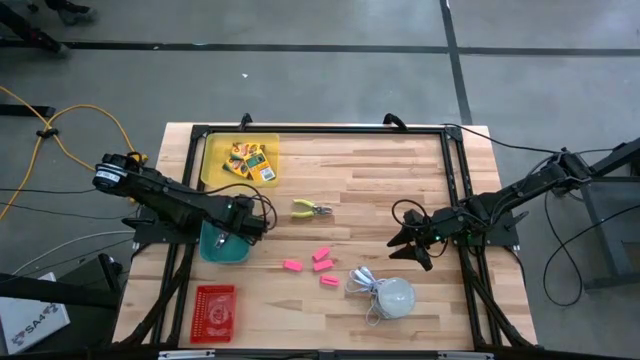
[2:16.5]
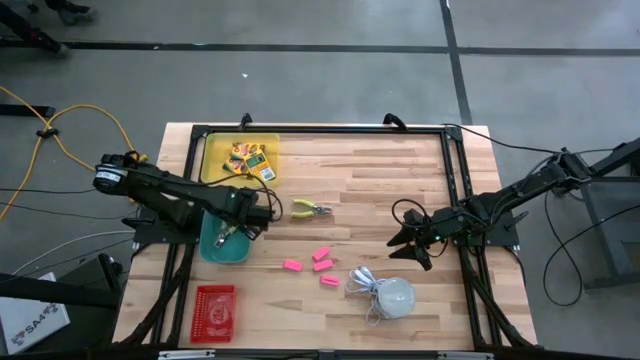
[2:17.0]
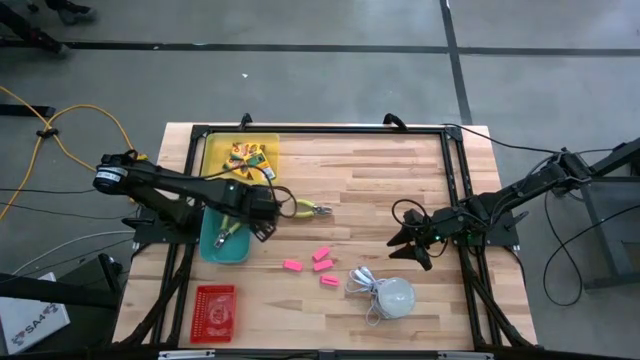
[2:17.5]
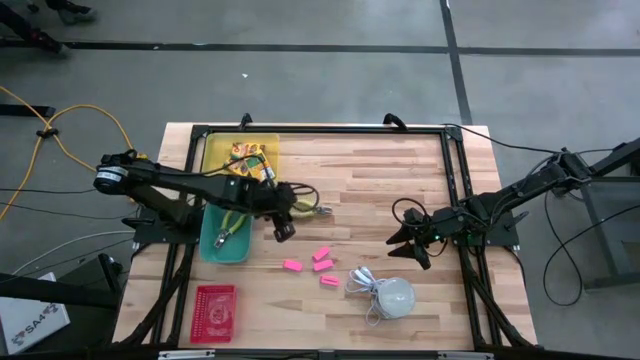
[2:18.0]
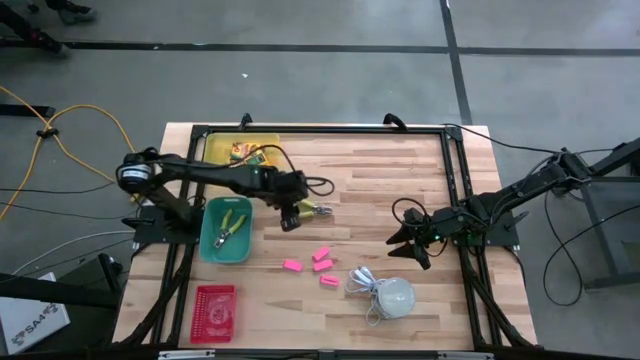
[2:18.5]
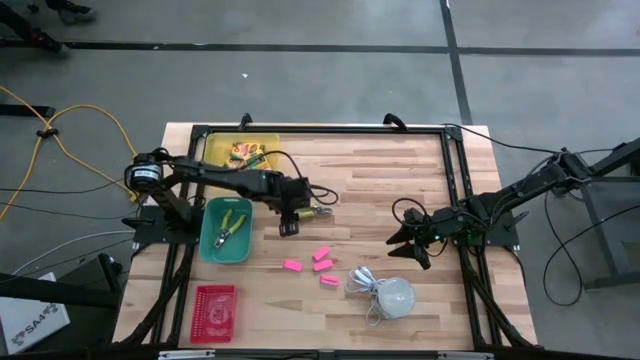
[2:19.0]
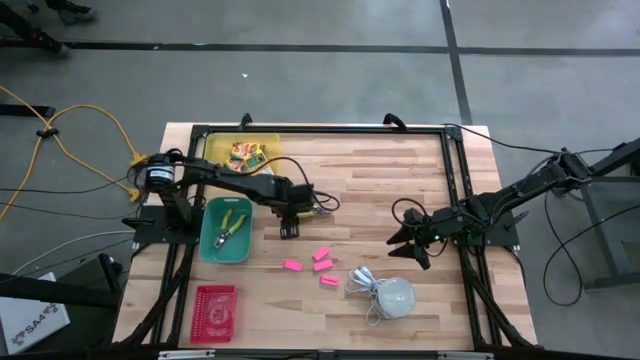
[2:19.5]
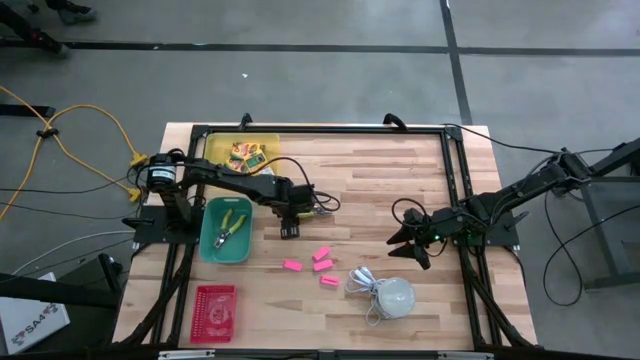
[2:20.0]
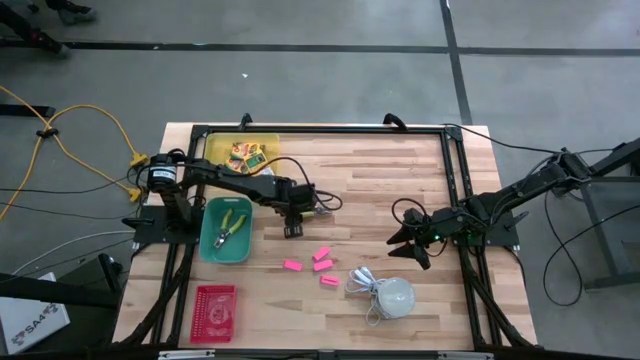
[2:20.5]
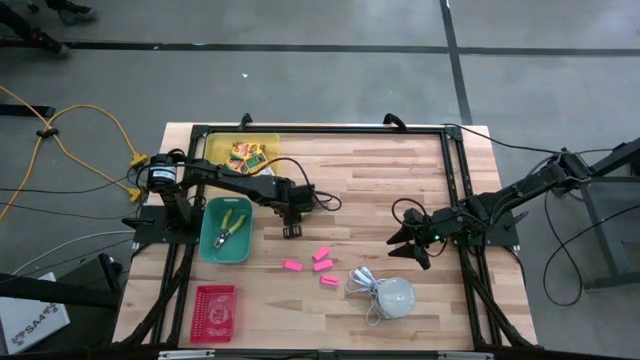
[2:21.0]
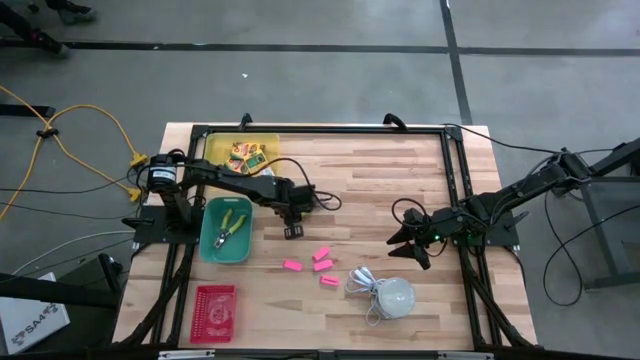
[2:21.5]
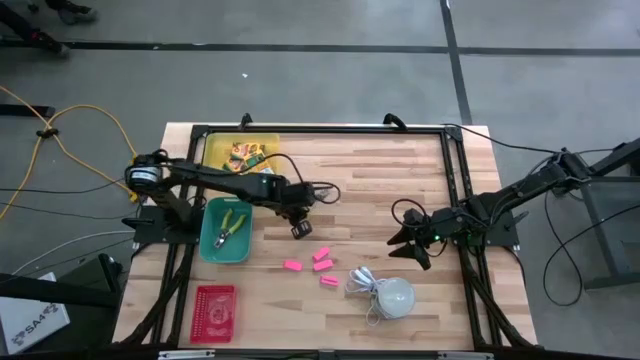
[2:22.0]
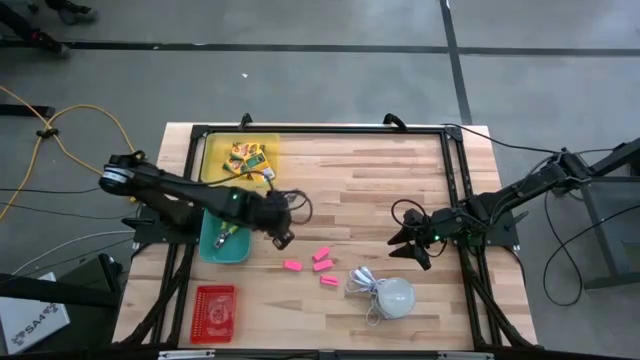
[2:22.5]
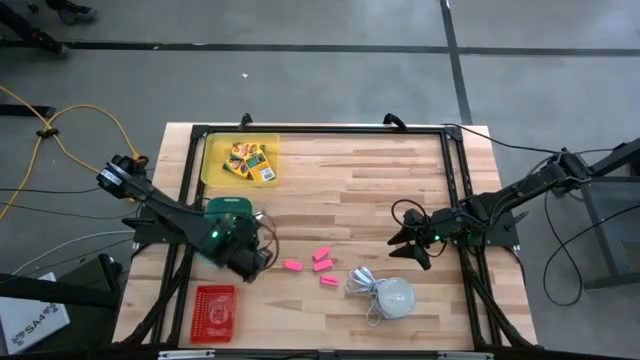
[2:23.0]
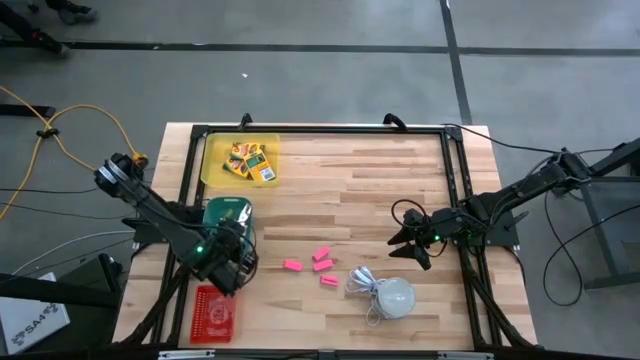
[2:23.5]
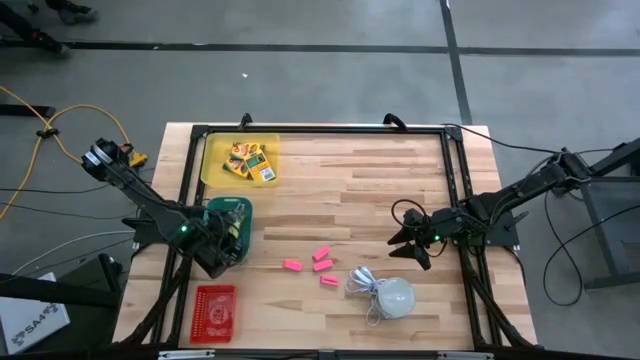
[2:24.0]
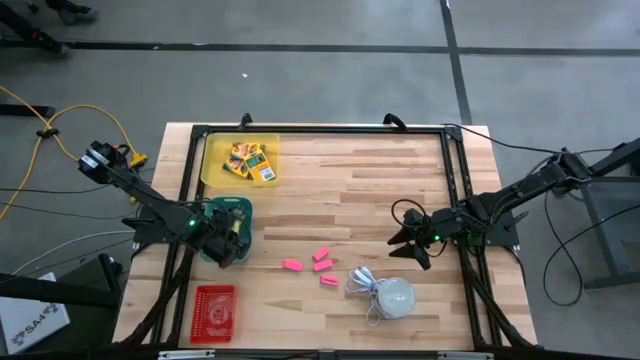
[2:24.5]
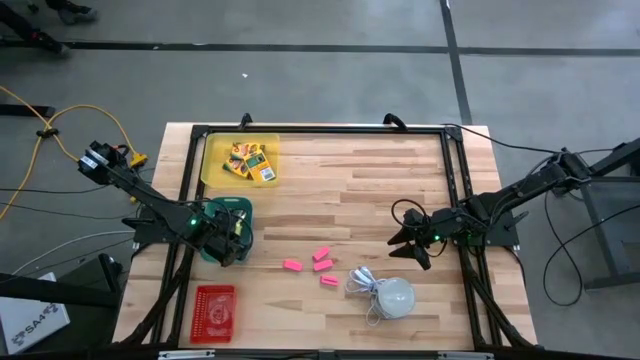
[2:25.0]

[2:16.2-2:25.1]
Task: Pick & Place School Supplies
Put the green puncher into the green bin

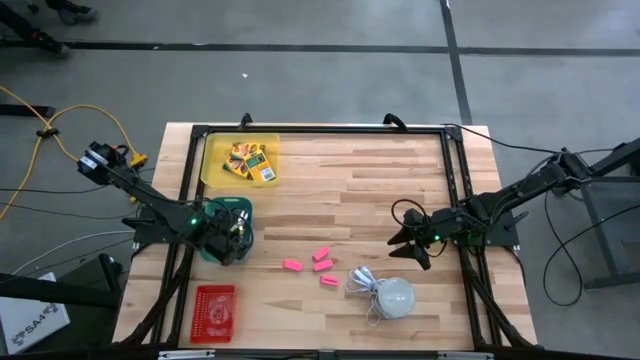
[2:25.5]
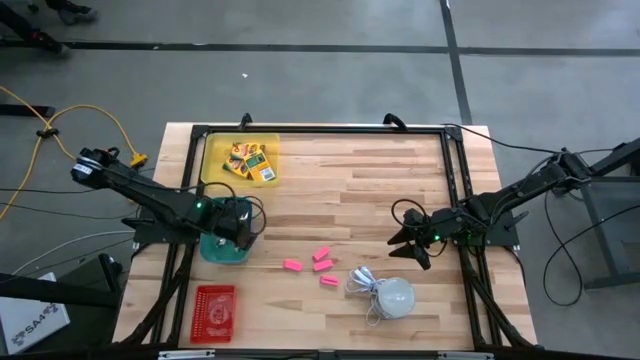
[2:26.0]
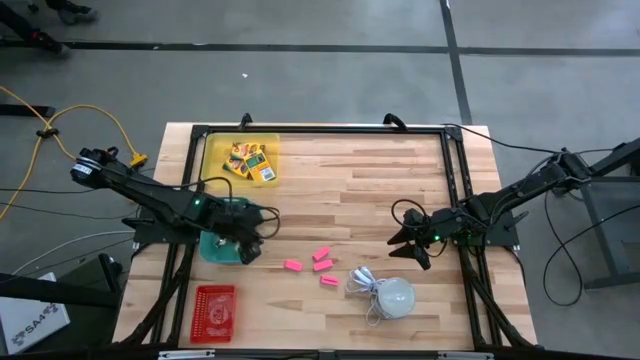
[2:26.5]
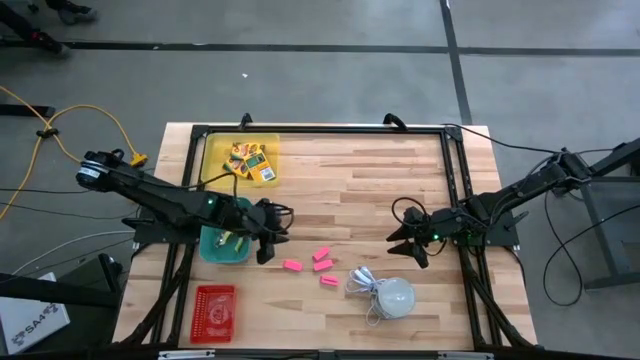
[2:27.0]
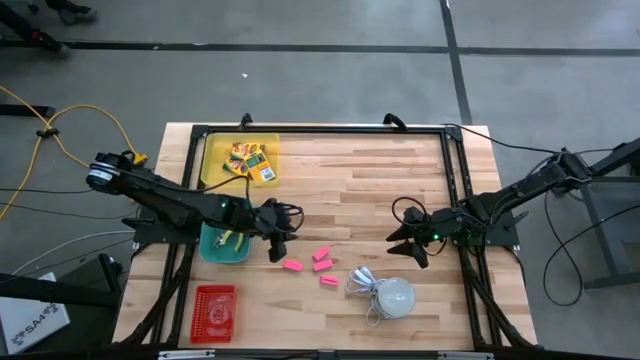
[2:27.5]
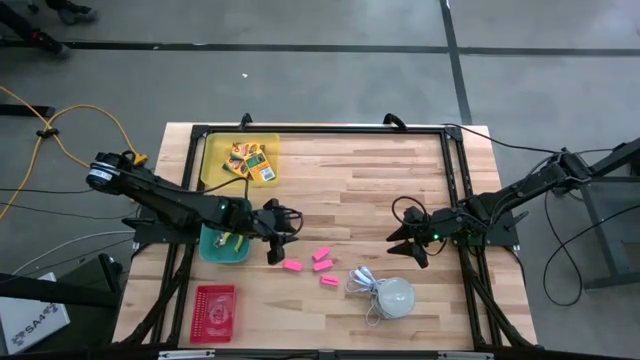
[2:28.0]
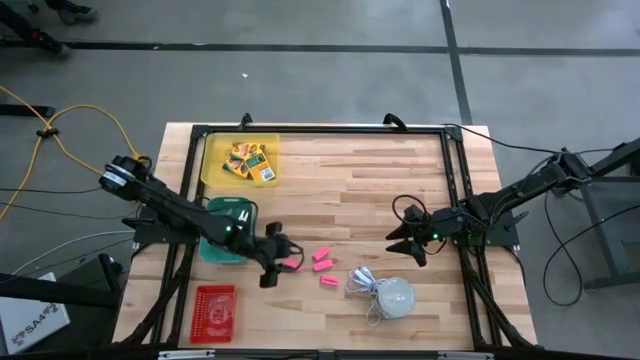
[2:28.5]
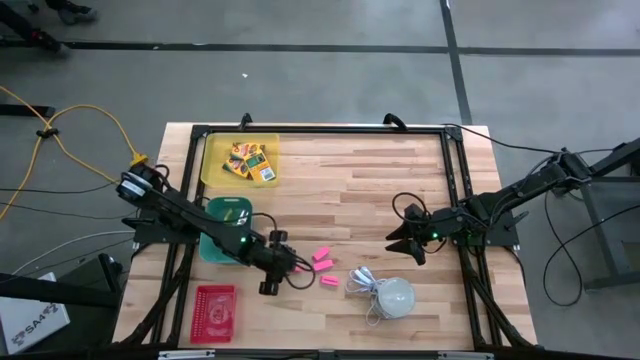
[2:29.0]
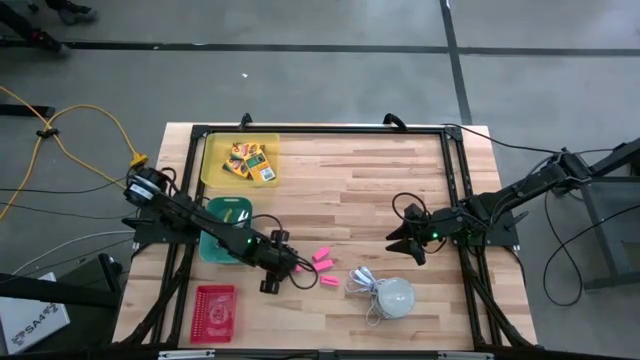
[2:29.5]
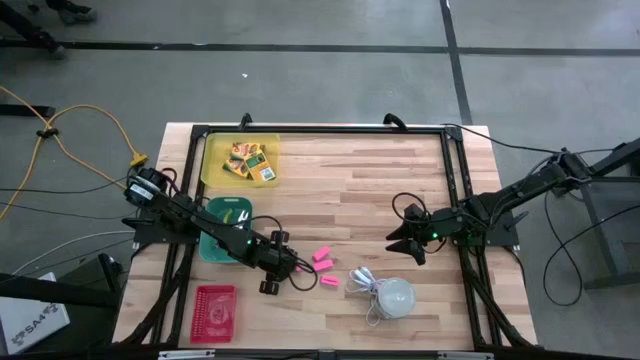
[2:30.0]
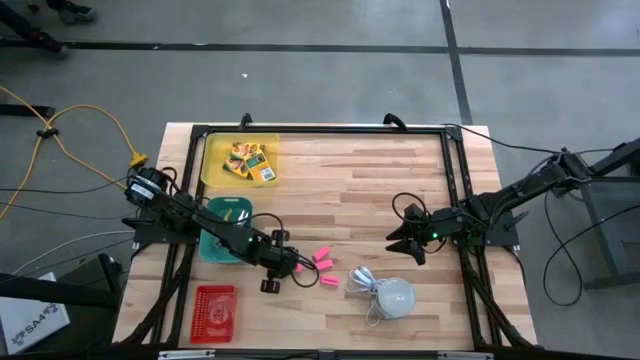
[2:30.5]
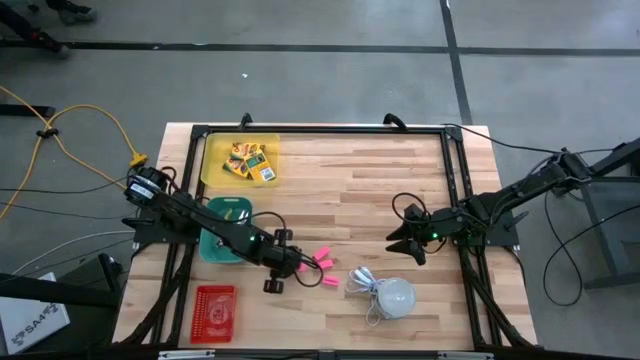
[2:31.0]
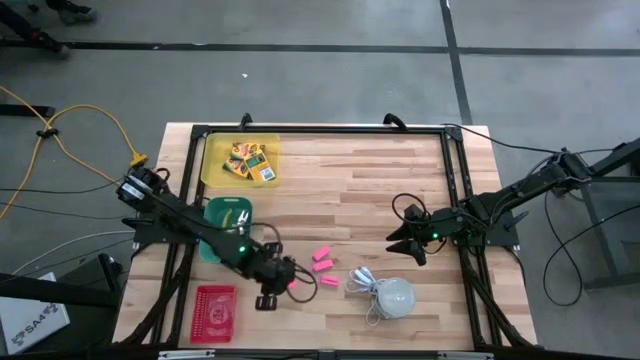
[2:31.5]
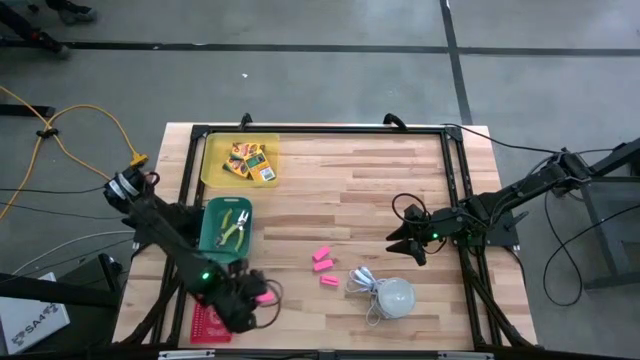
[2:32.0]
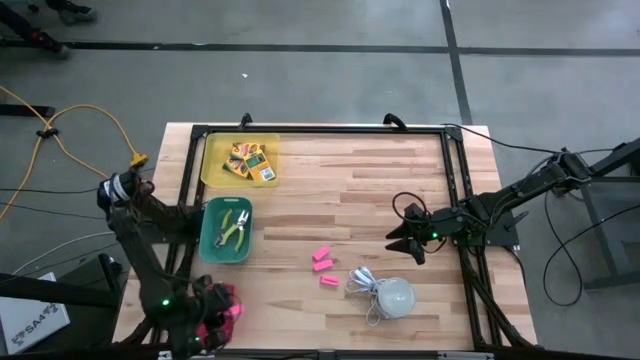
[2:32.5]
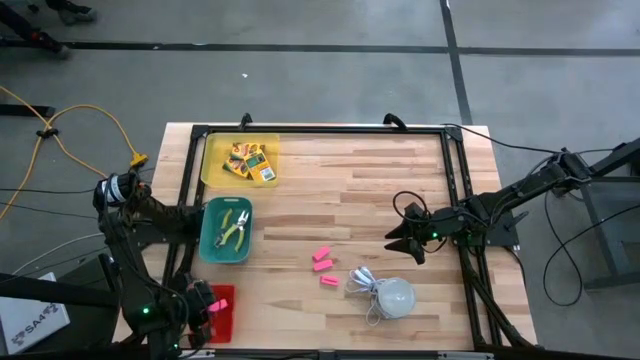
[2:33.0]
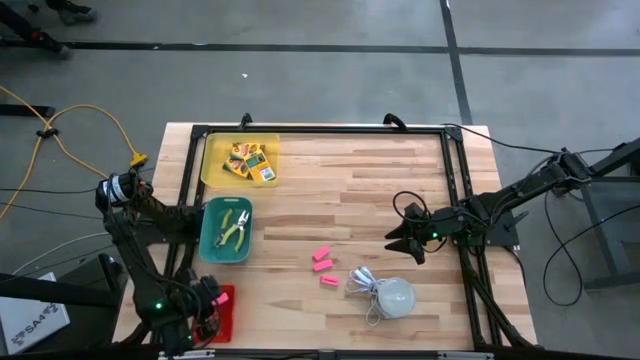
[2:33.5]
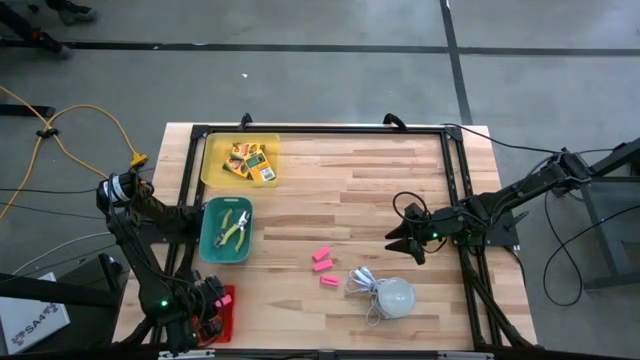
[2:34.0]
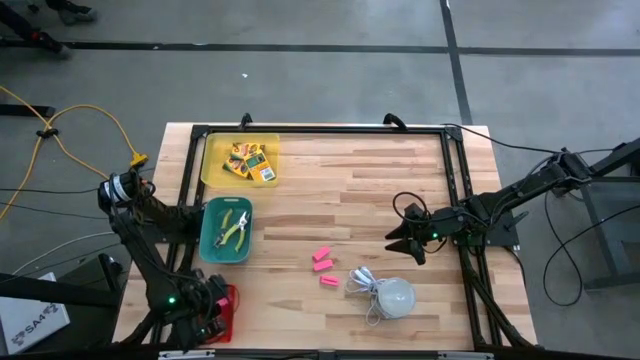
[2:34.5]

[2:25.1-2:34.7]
Put the middle left pink eraser into the red basket

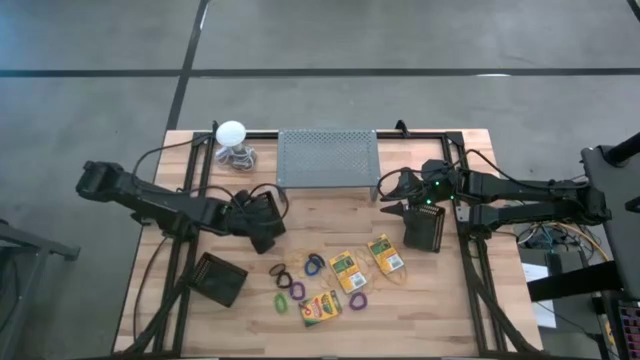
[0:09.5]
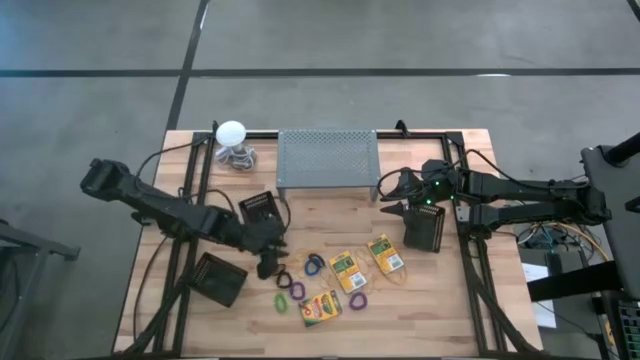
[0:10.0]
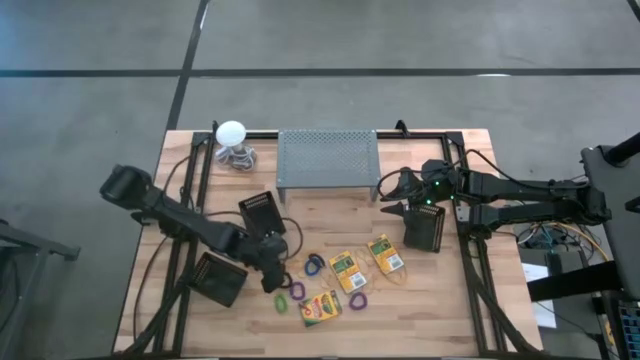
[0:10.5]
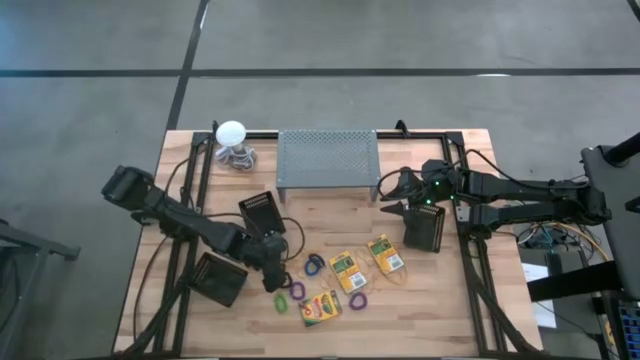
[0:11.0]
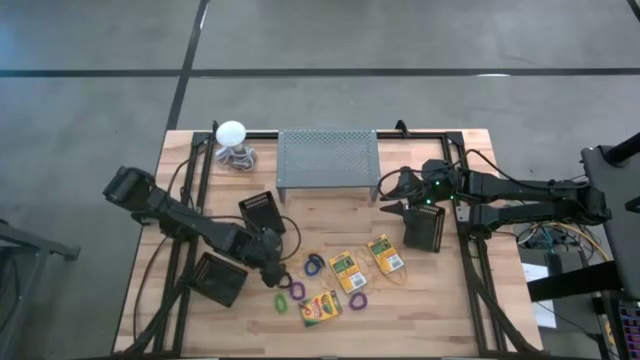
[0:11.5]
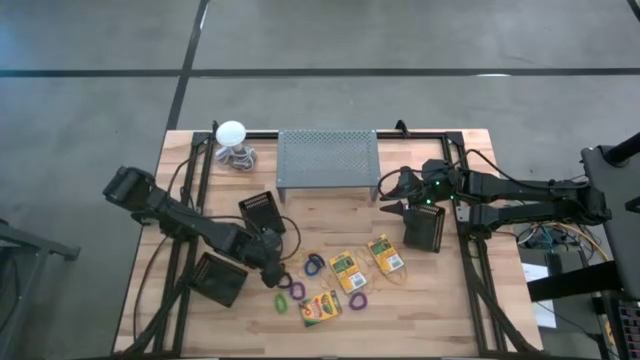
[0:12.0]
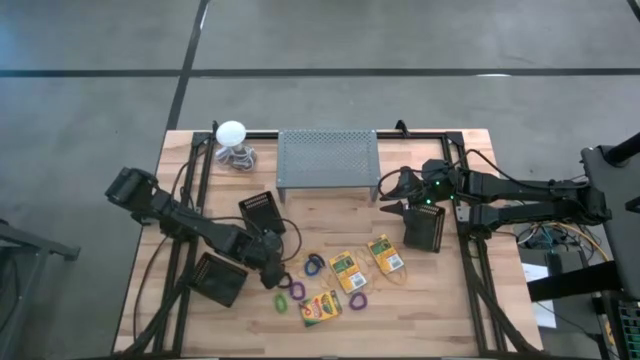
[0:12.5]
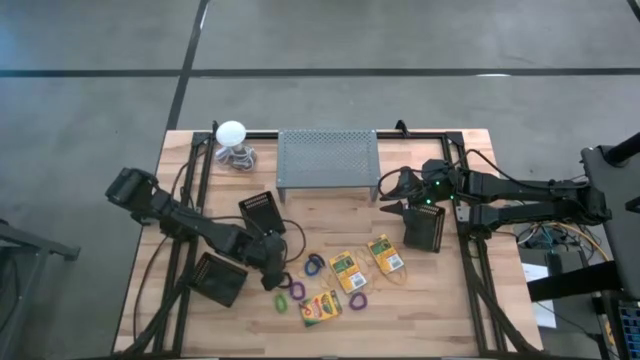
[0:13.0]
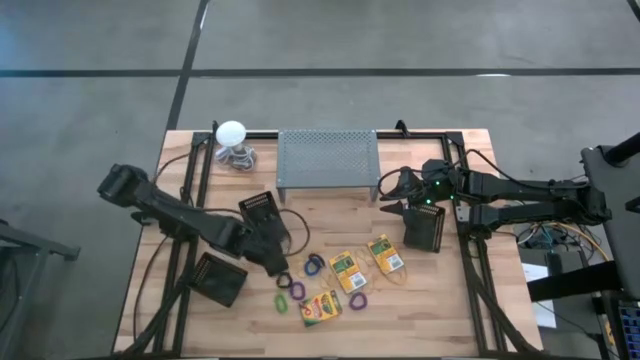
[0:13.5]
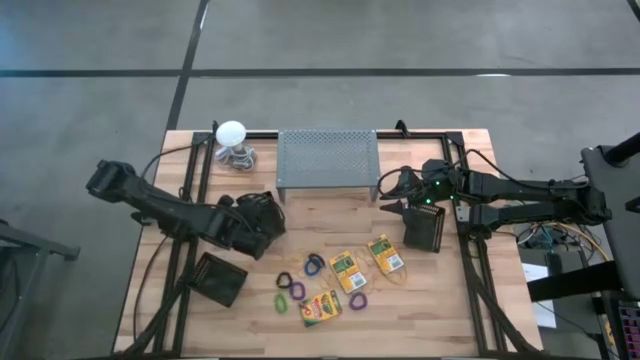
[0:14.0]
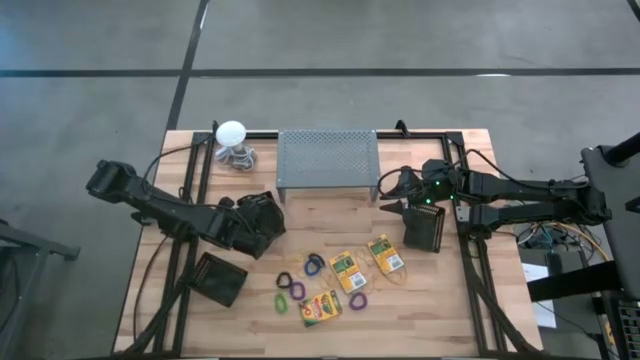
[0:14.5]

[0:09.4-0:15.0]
Task: Pick & Place Office Desk Supplies
Put the black rubber band into the top left black bin
